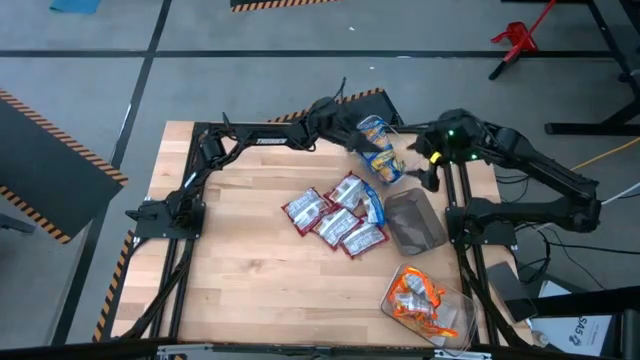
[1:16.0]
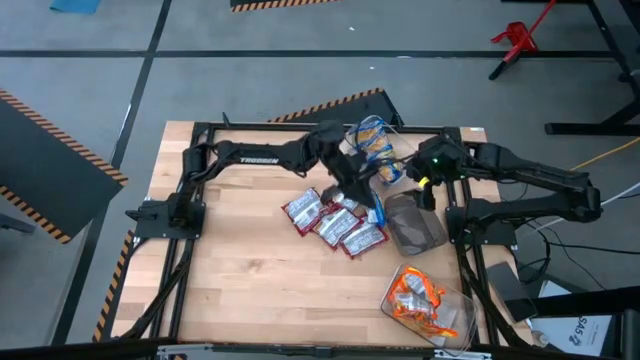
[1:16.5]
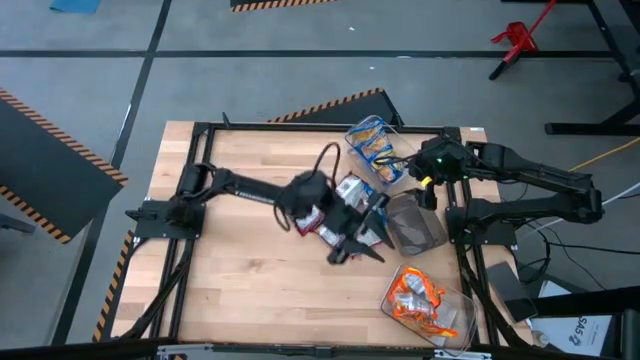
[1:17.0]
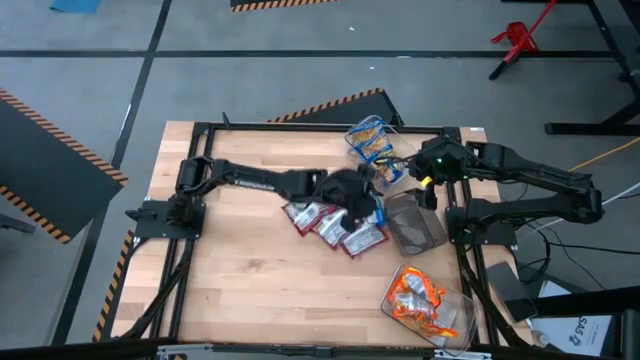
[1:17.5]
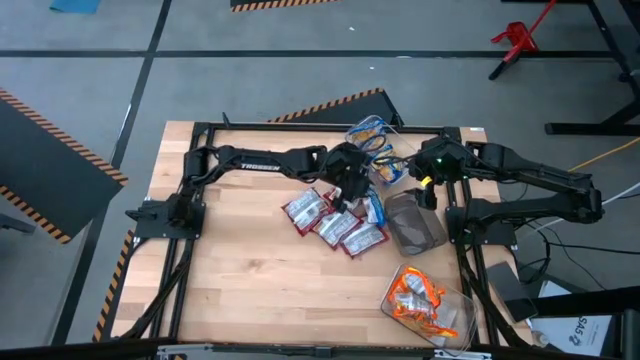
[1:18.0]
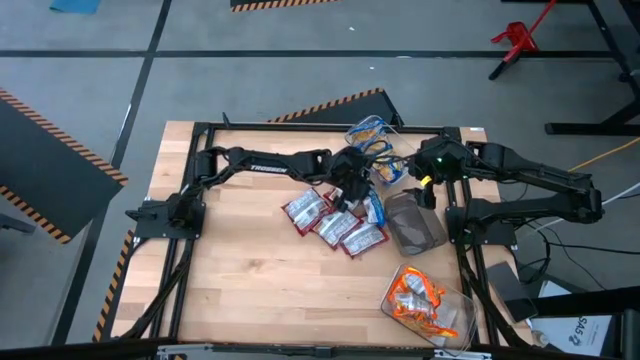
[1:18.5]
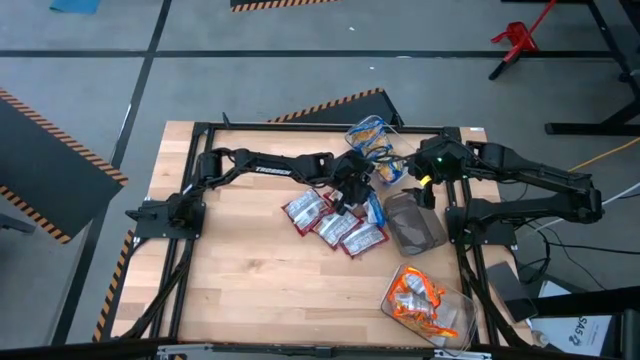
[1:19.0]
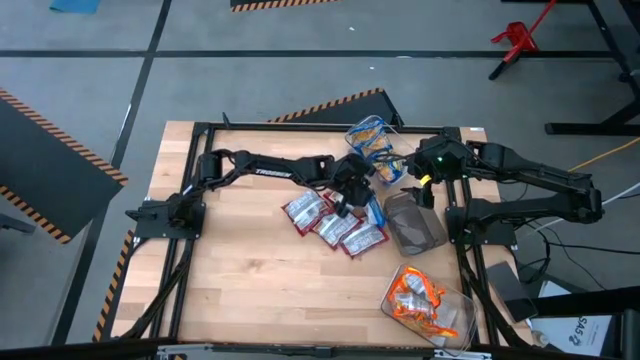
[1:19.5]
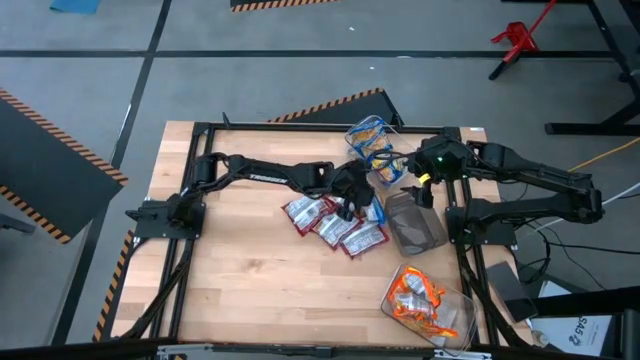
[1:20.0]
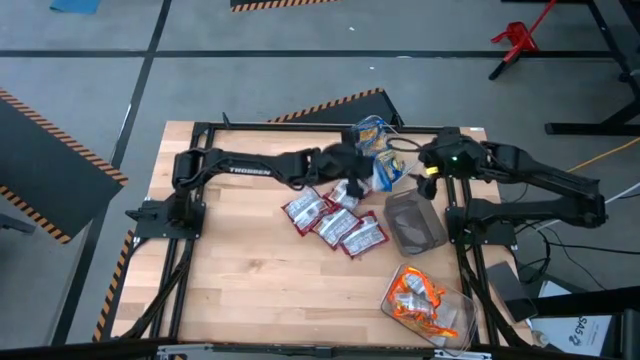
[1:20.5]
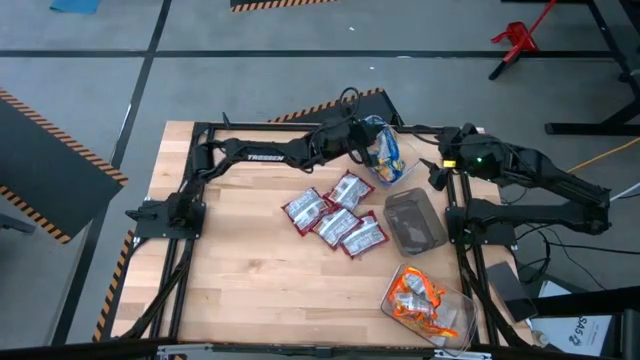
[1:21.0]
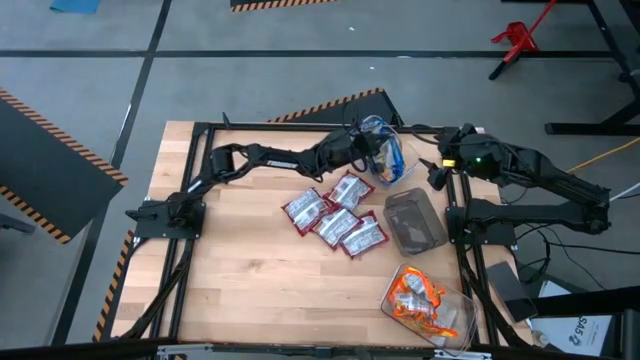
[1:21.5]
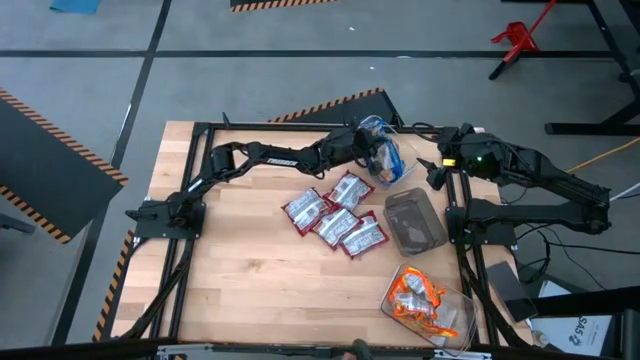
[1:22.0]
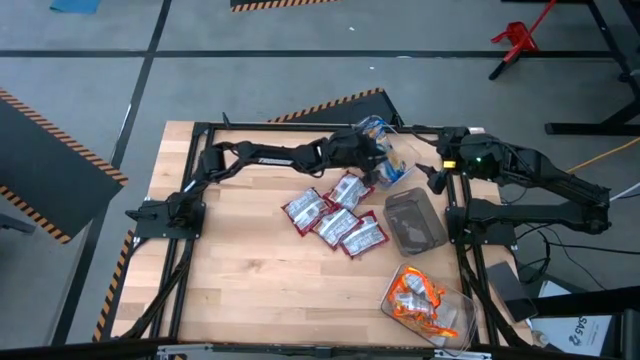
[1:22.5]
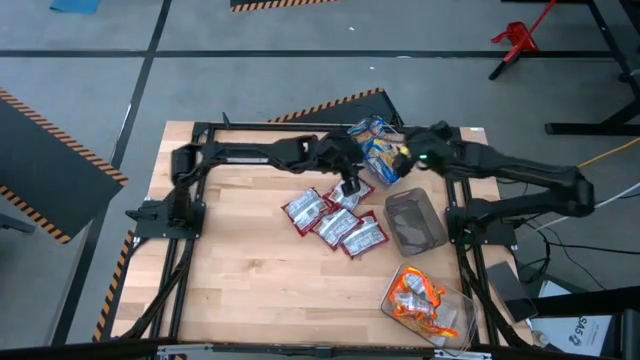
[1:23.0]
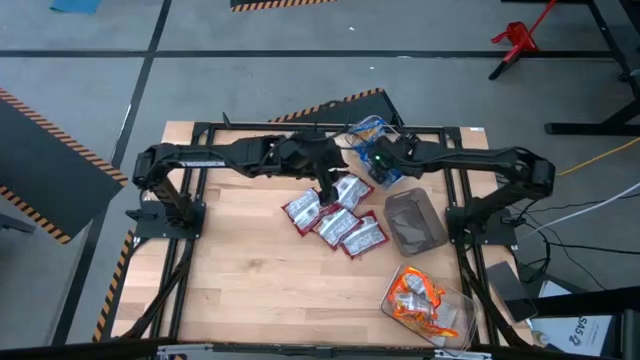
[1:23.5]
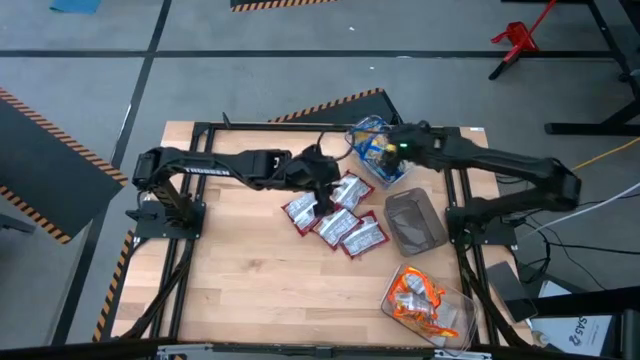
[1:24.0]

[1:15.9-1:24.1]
Task: Sort Maruchan noodles
Put the blue bag into the top transparent bin

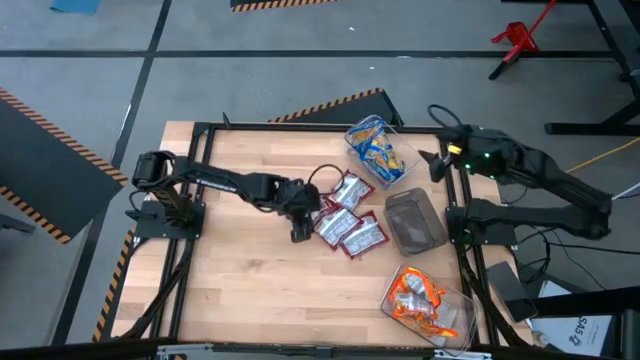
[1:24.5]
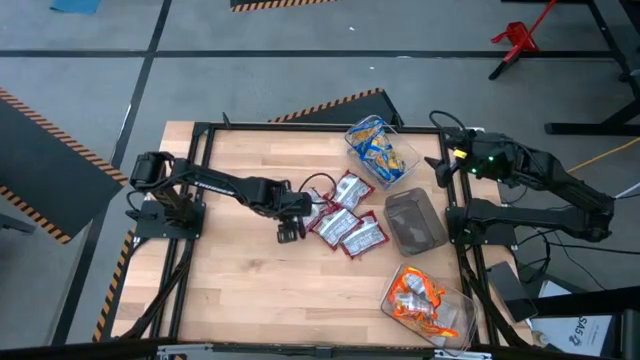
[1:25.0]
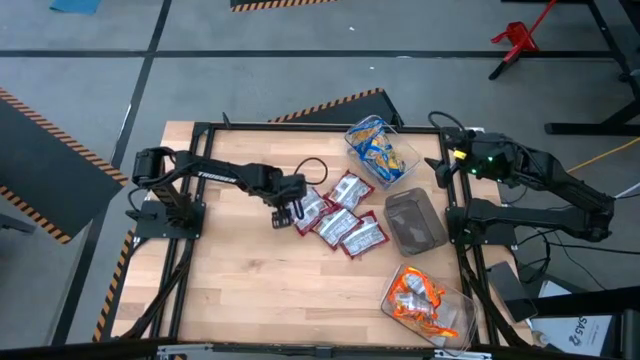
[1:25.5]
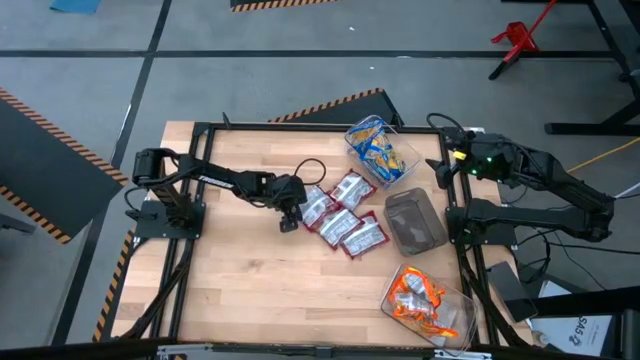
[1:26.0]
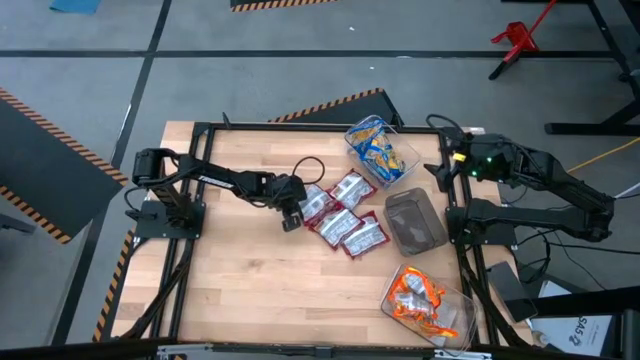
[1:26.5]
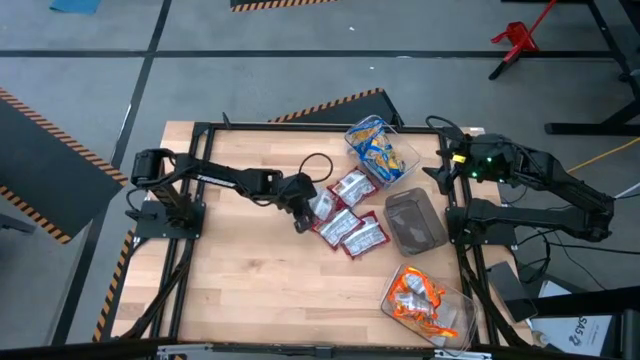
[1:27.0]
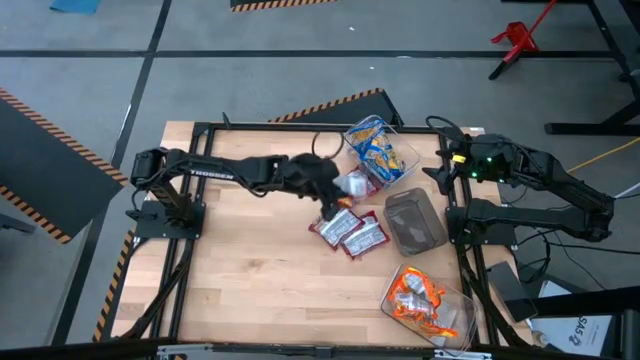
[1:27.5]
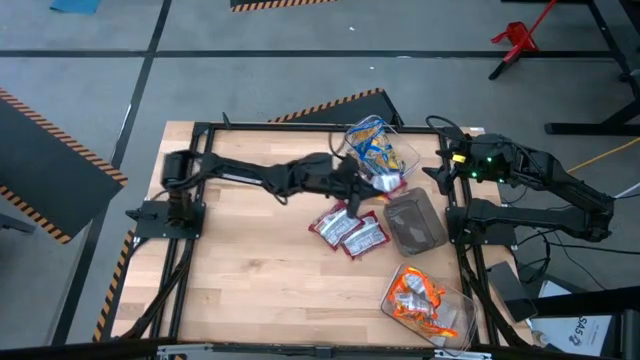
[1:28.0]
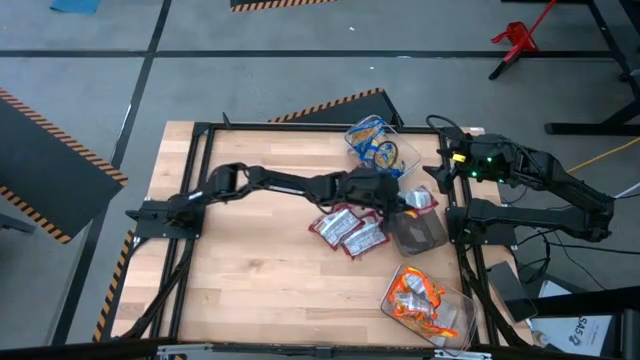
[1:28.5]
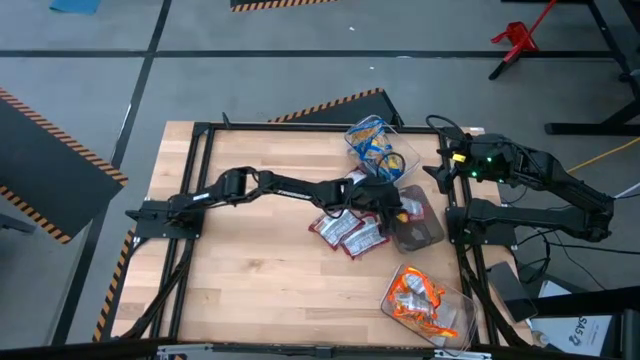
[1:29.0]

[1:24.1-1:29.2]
Put the red bag into the black bin

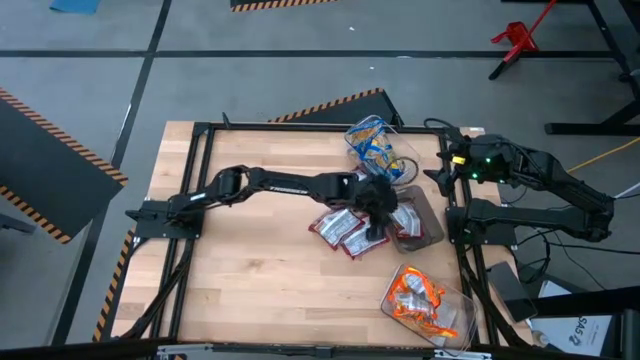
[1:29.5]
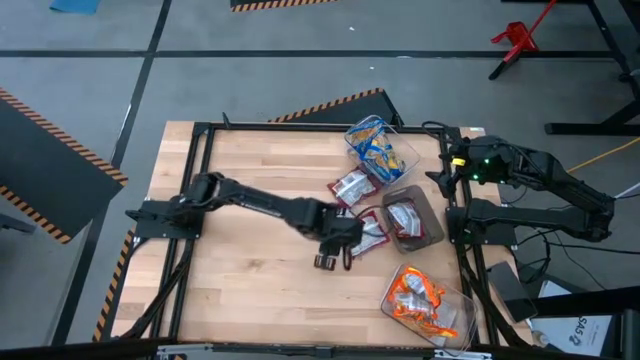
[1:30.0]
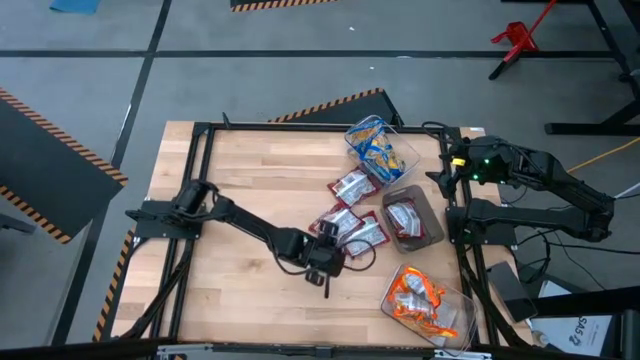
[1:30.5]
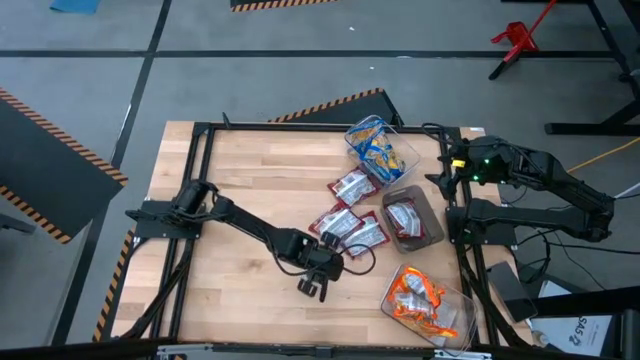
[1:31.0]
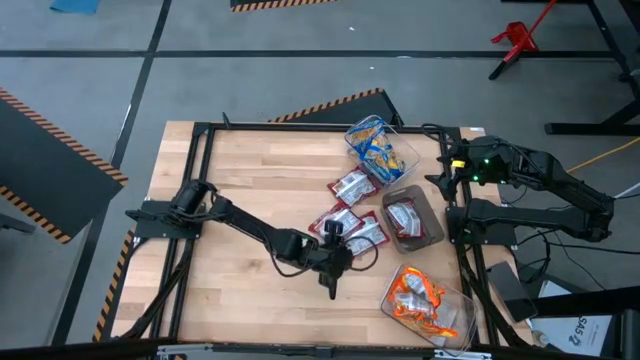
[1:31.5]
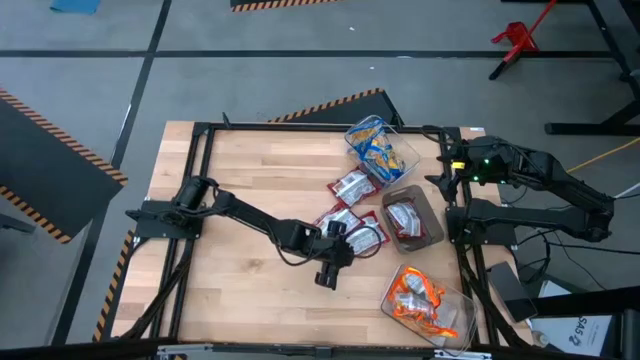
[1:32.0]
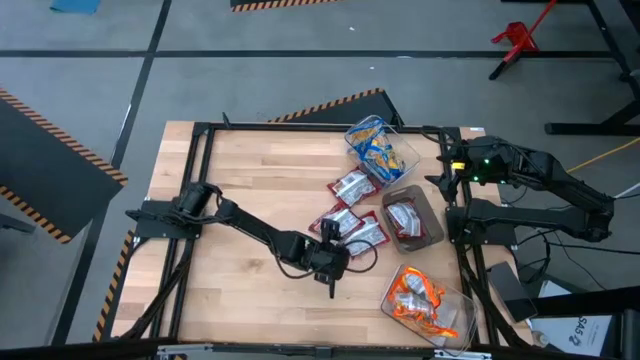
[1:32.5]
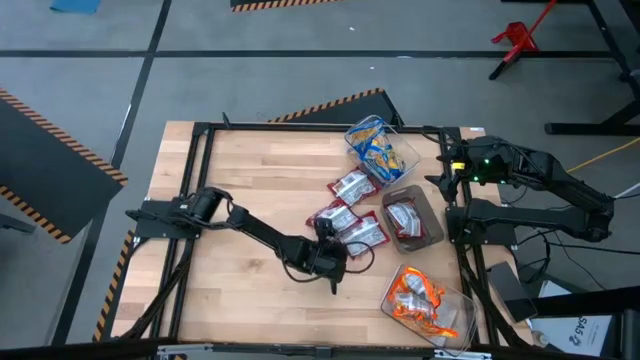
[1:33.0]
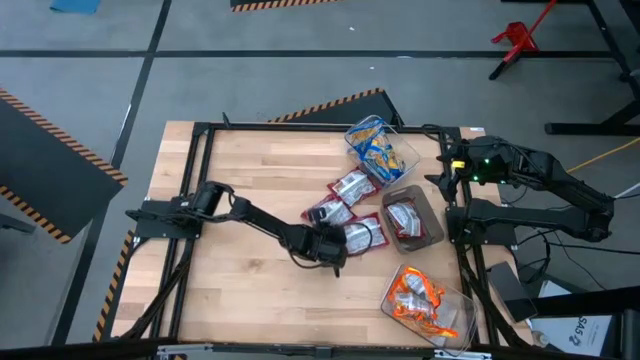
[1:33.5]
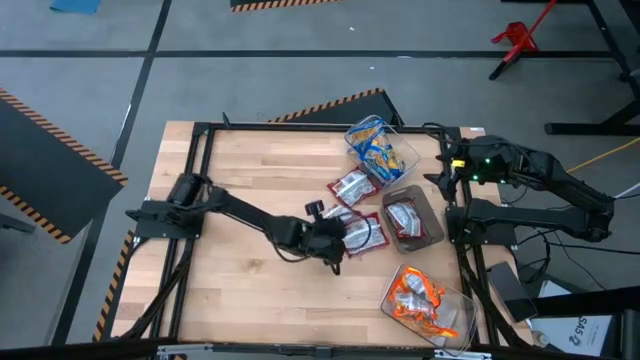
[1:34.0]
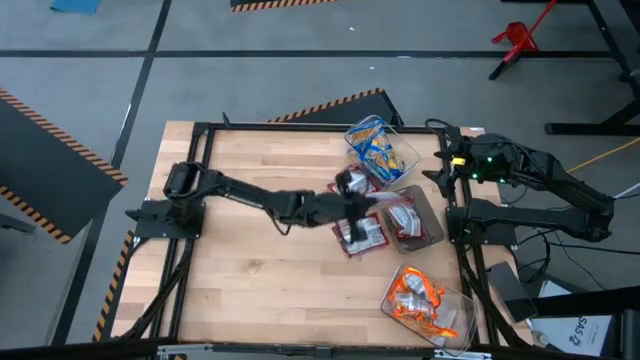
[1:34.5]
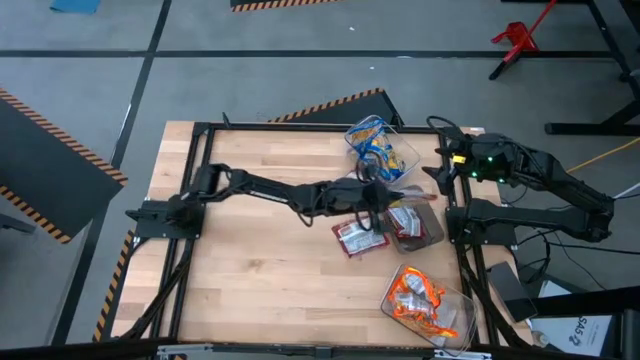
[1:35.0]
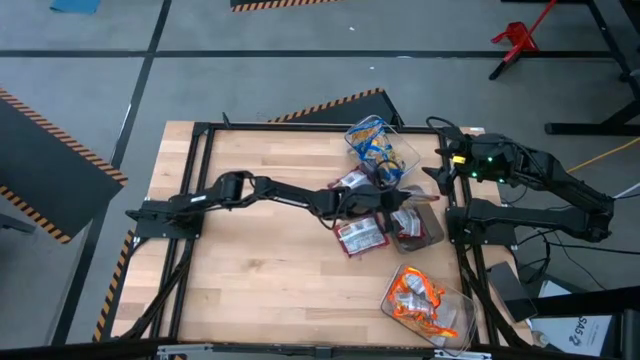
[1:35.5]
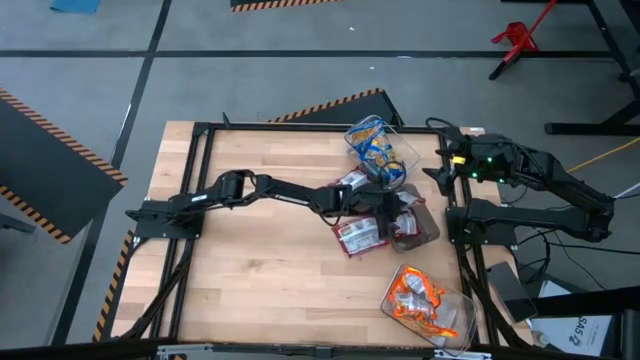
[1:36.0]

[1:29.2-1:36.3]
Put the red bag into the black bin

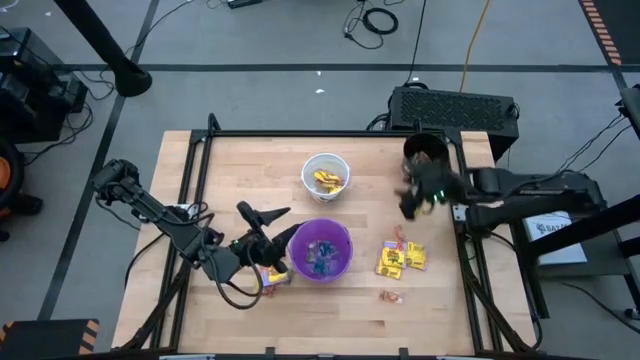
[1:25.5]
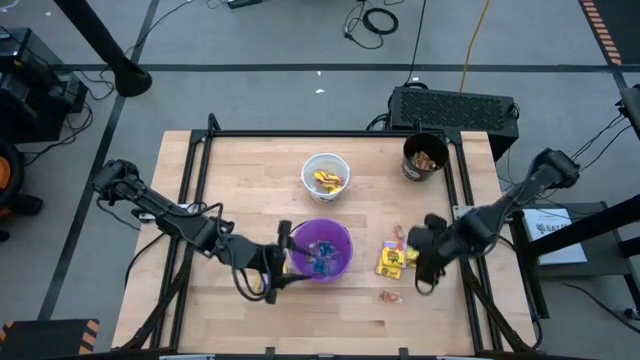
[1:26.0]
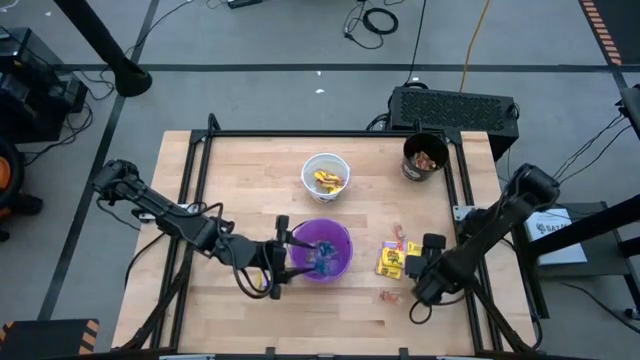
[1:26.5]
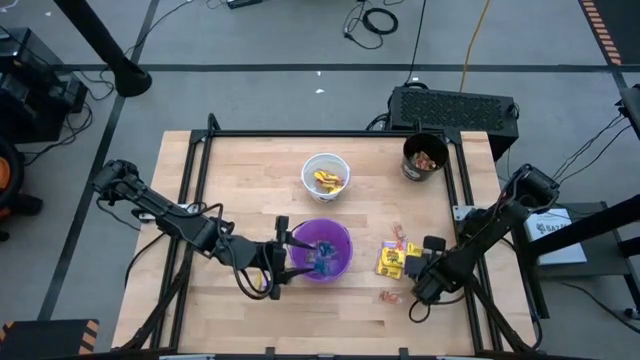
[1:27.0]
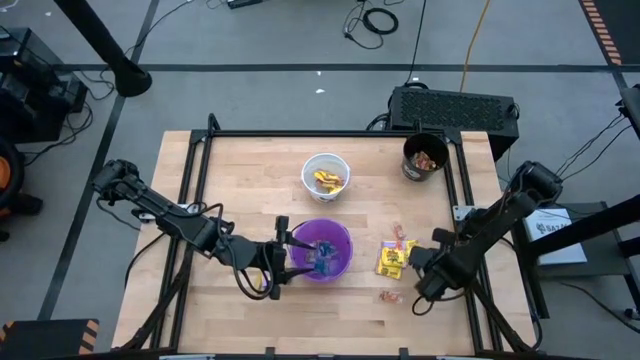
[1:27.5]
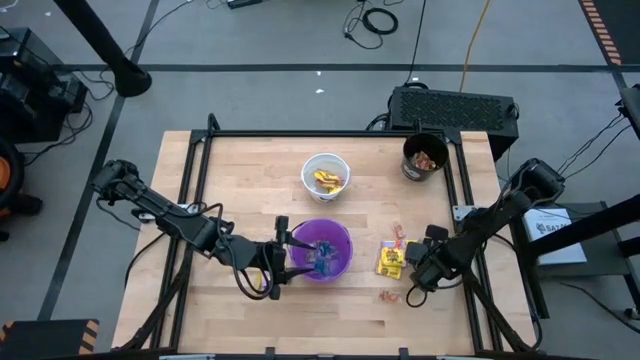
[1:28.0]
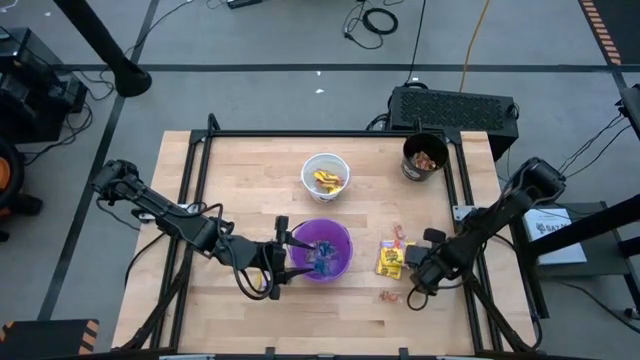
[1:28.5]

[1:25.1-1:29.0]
Task: Sort candy by brand, put in halloween buckets
Put the yellow candy into the white bucket
